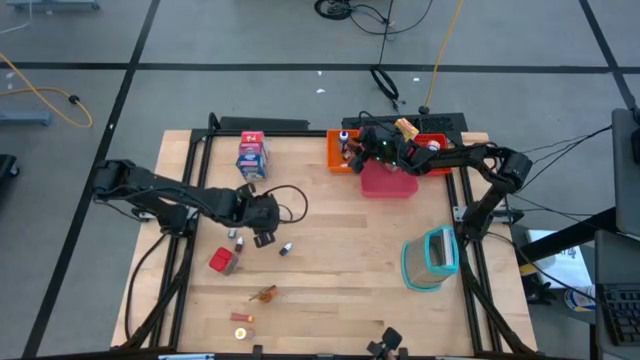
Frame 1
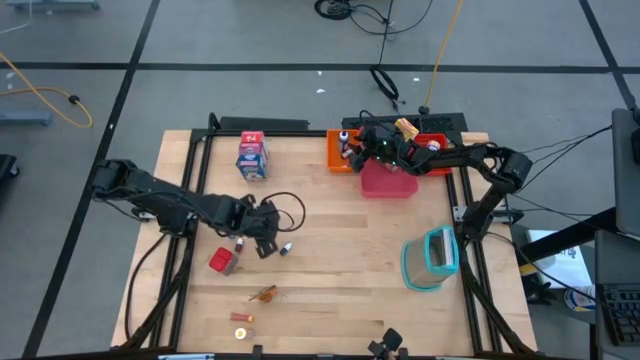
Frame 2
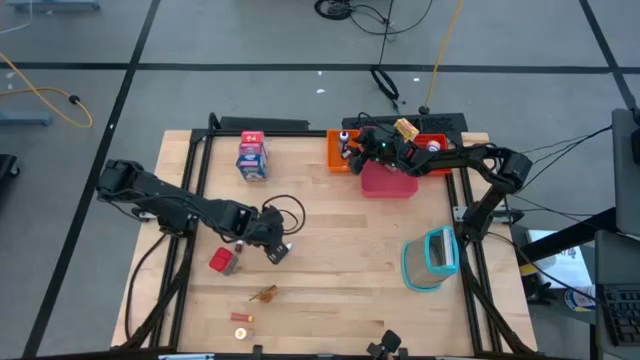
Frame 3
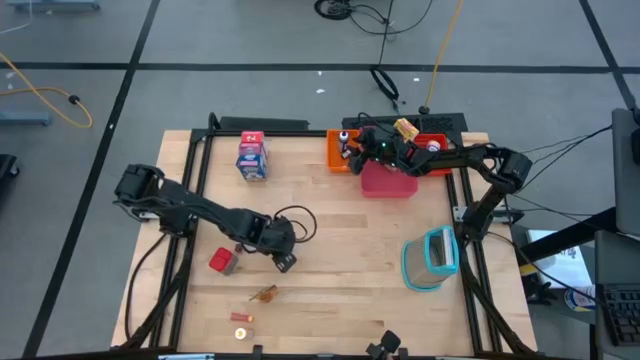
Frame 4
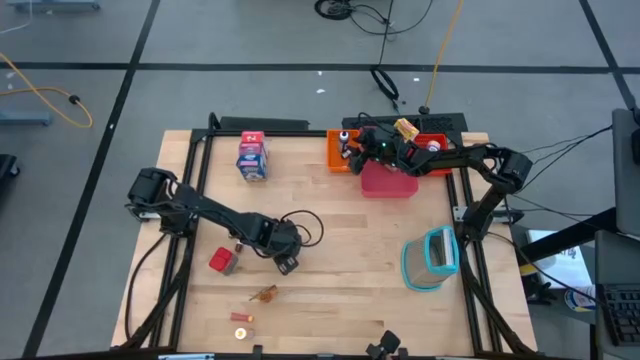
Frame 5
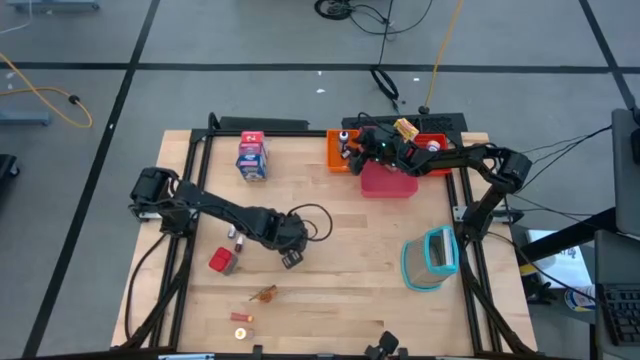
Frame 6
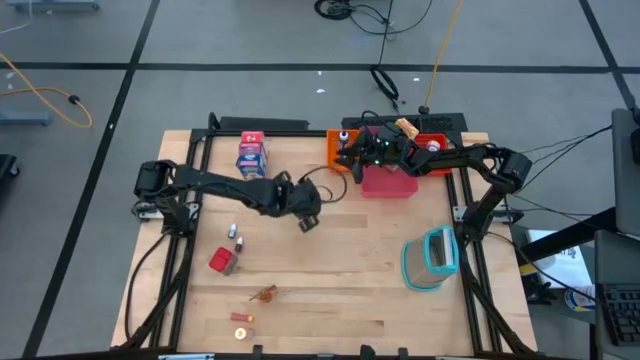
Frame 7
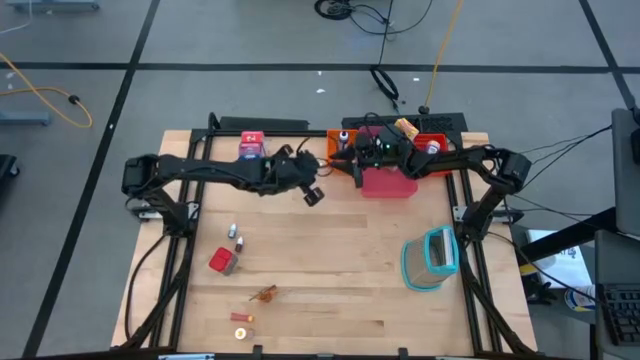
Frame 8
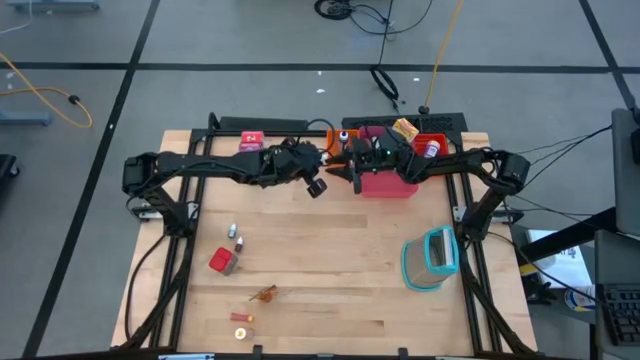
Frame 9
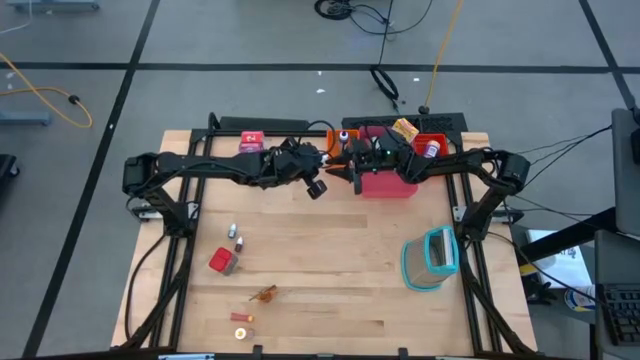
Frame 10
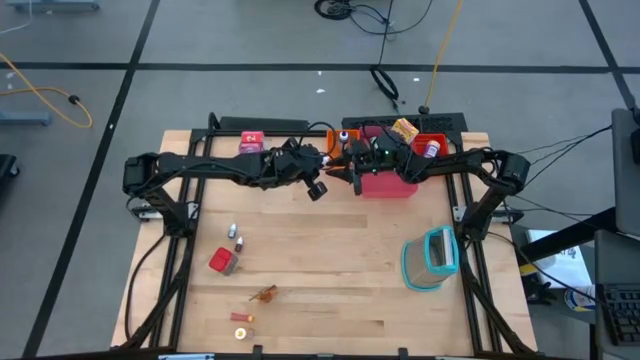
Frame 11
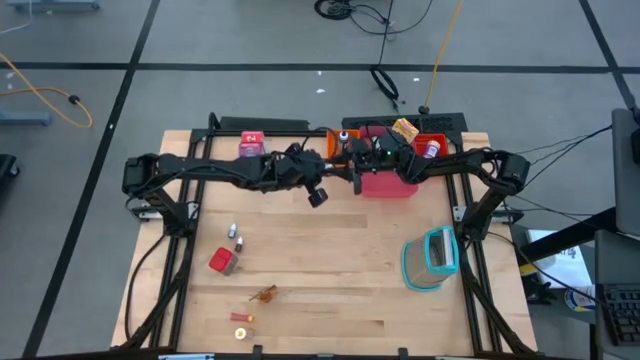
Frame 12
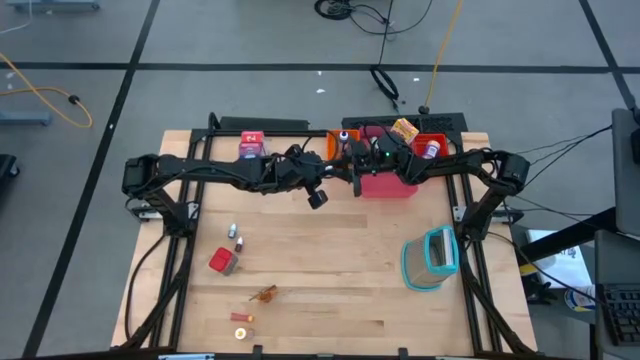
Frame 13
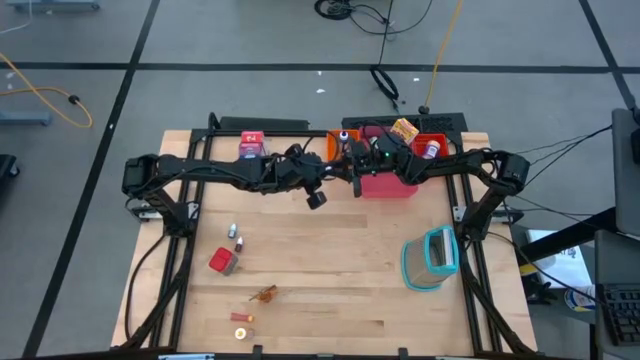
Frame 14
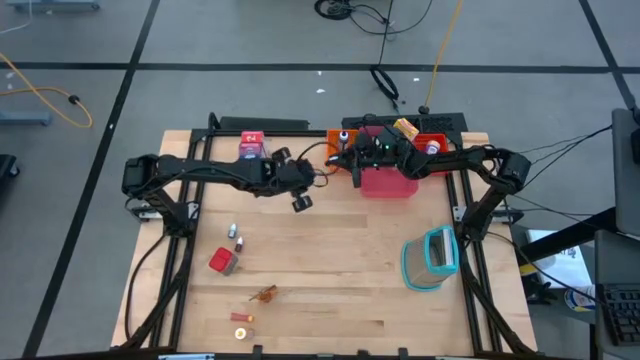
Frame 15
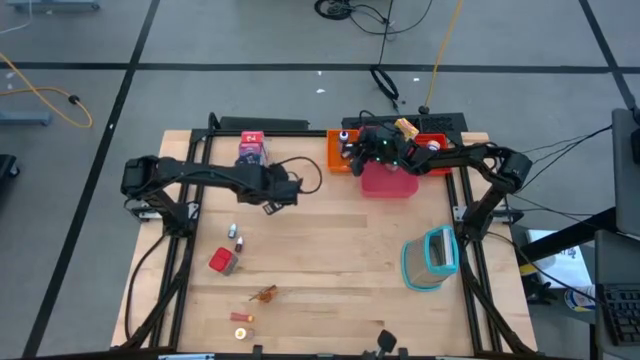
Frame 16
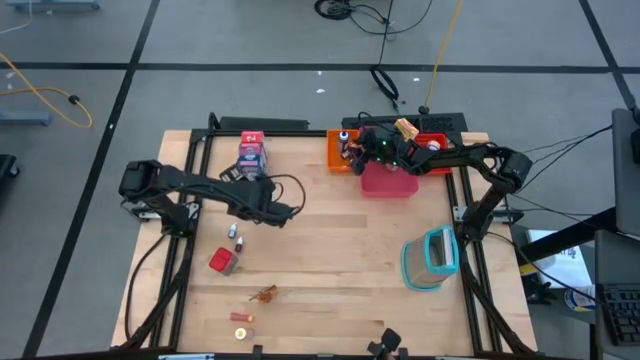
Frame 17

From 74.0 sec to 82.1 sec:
Task: Pick & Place Kitchen Items
Put the small red food coloring bottle into the orange bin

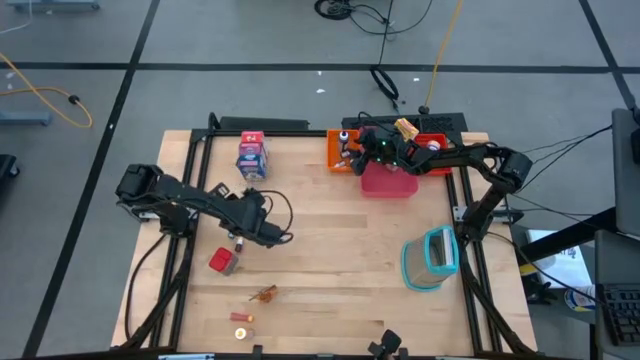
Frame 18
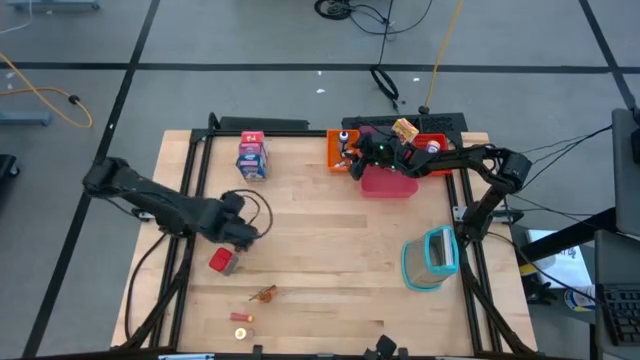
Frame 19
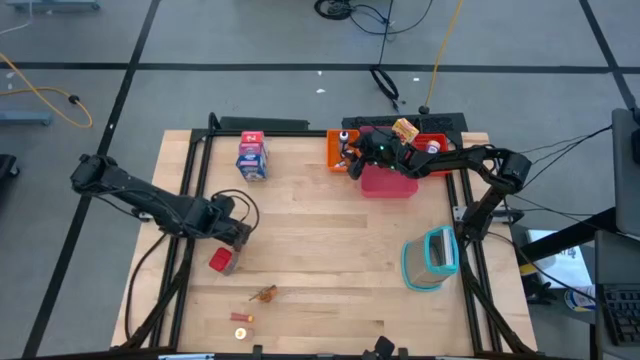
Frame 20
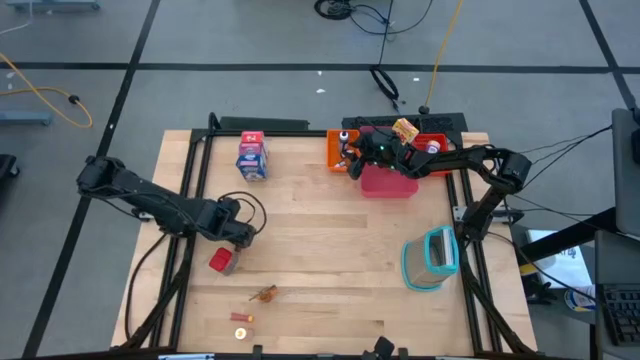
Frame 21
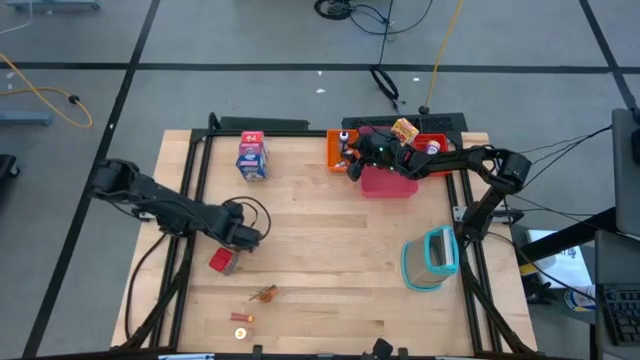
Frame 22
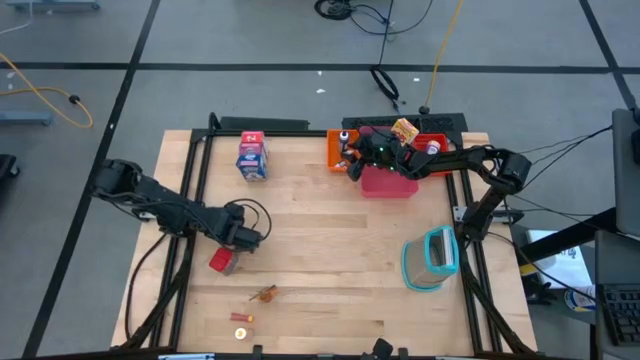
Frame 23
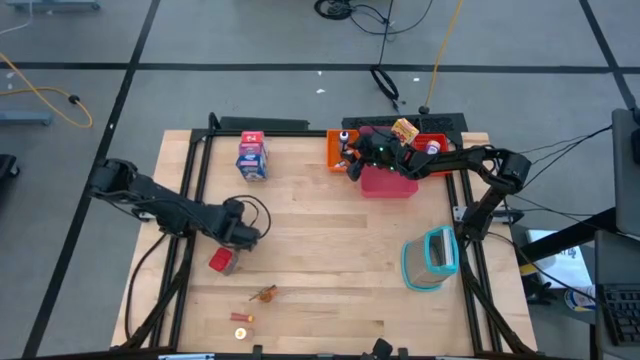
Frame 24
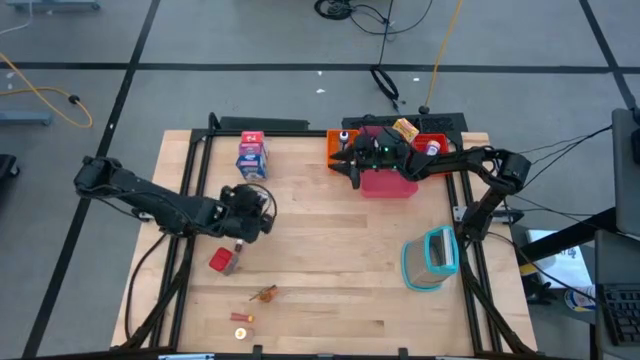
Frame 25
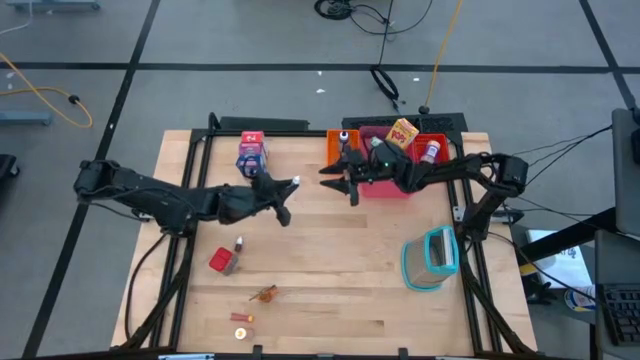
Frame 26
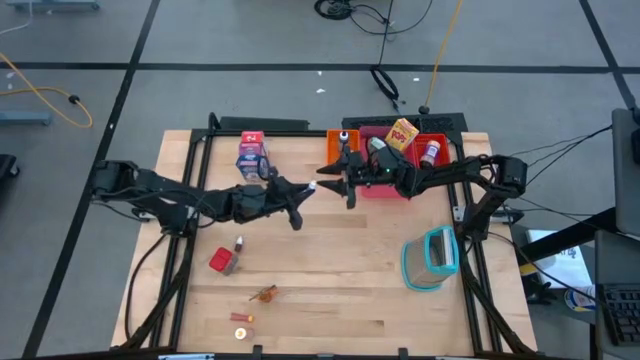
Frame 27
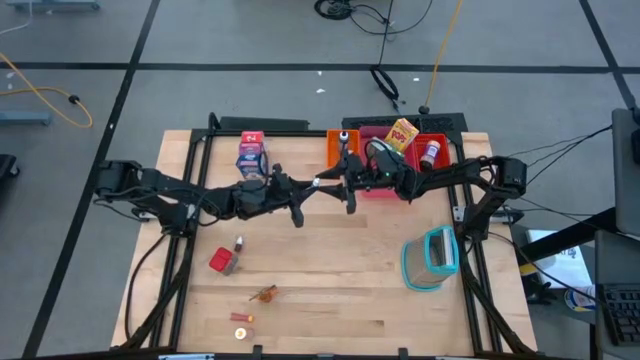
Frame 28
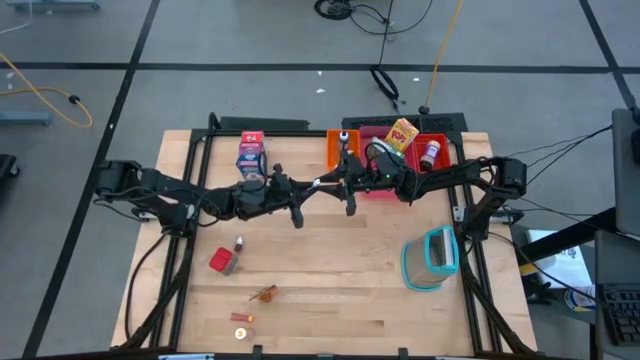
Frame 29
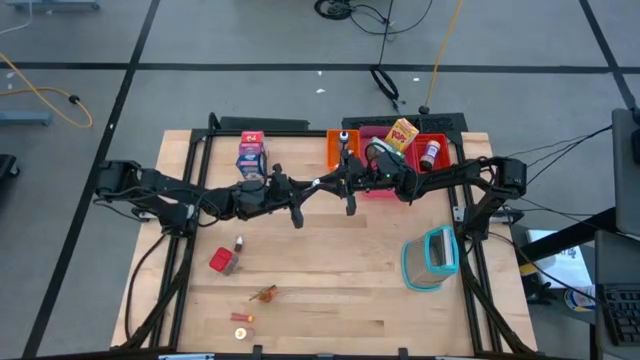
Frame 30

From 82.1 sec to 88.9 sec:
Put the small purple food coloring bottle into the orange bin

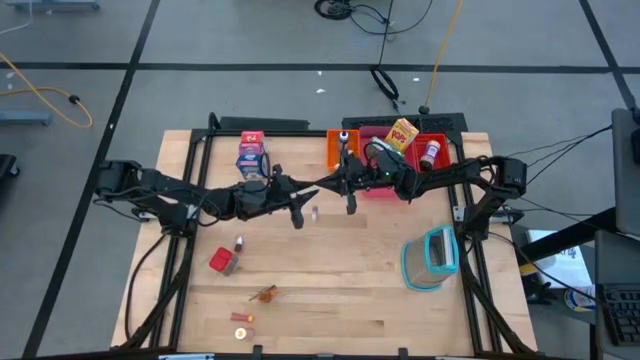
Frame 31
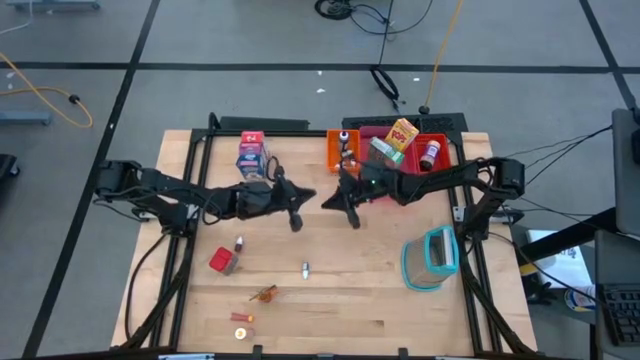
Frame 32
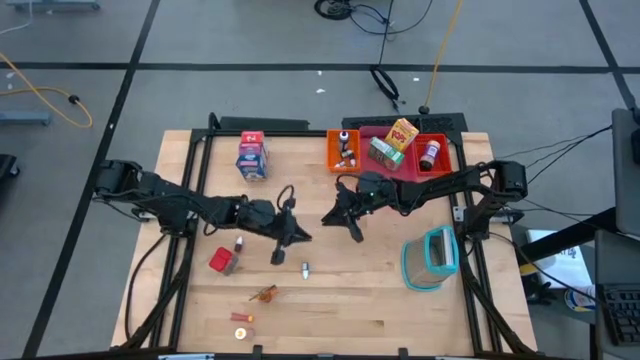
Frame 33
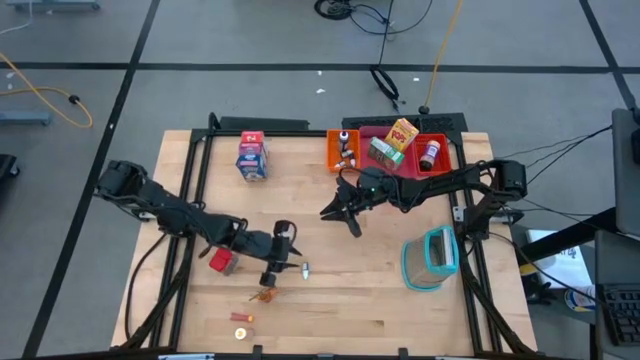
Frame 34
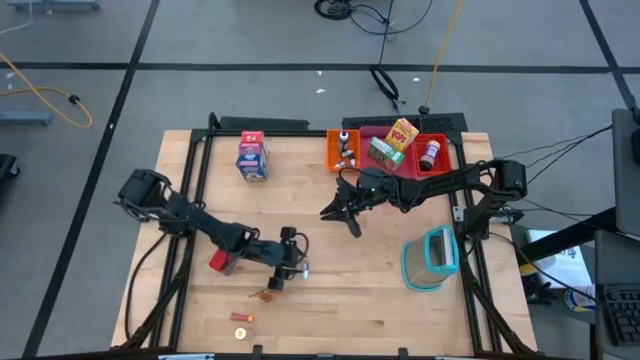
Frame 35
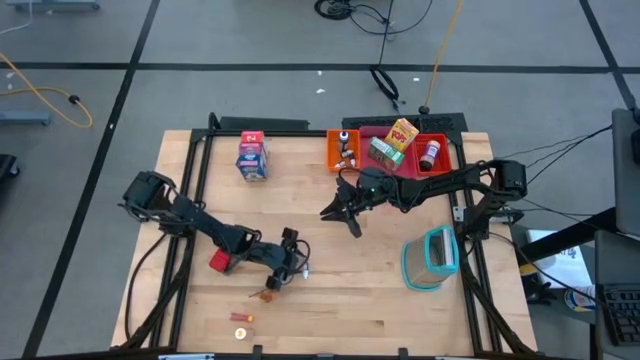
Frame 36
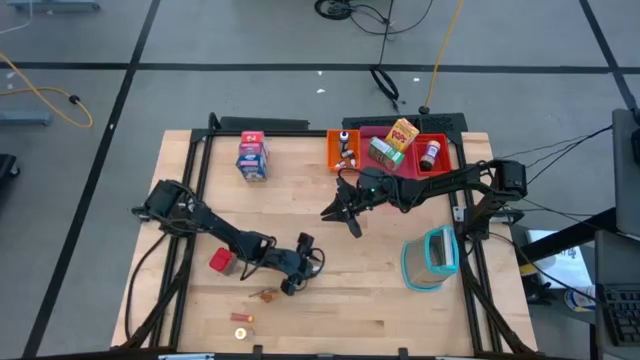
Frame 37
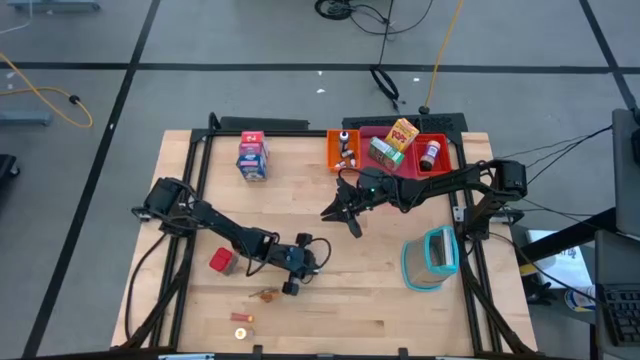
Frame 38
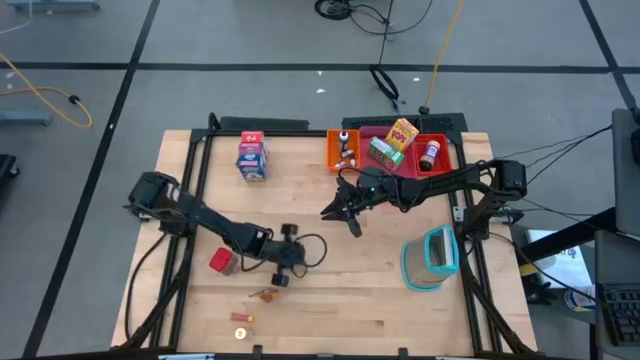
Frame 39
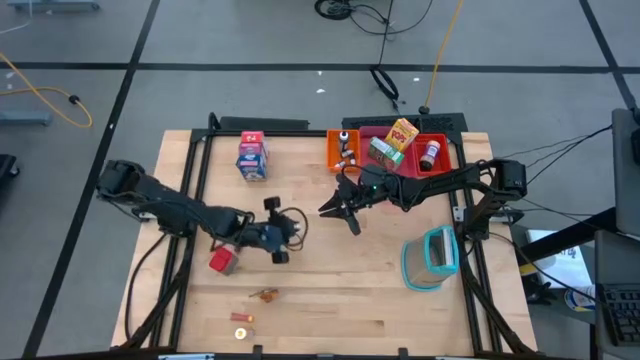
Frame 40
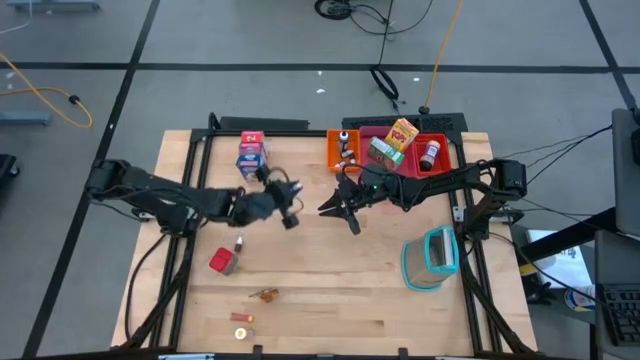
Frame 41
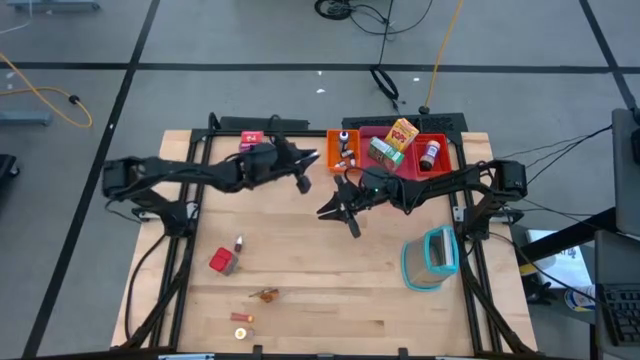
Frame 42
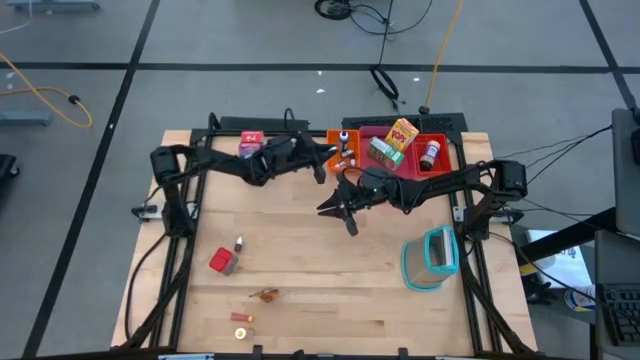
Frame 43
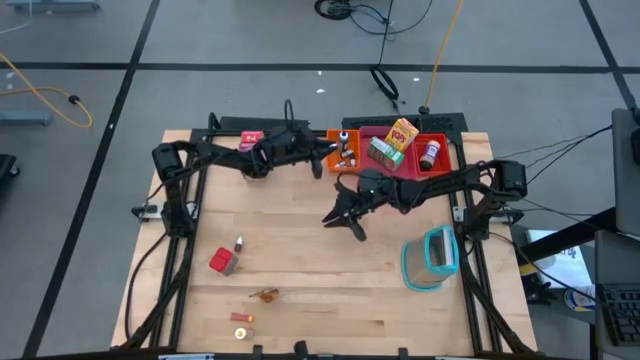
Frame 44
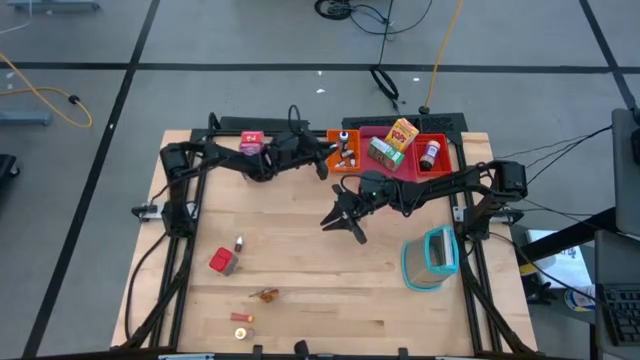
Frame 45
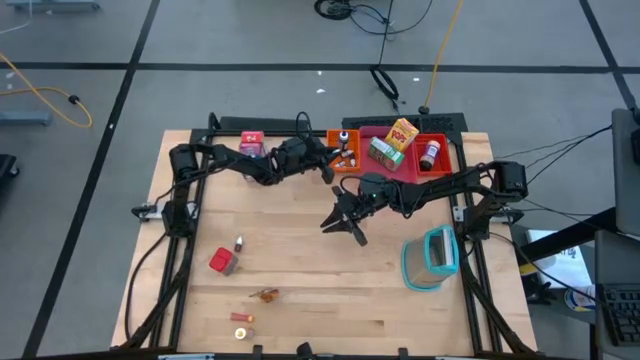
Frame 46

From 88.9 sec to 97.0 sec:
Put the small purple food coloring bottle into the orange bin
